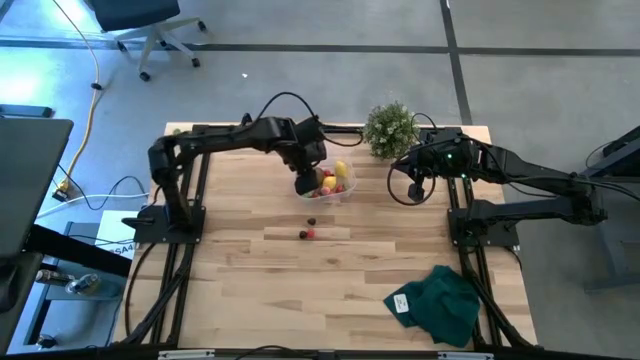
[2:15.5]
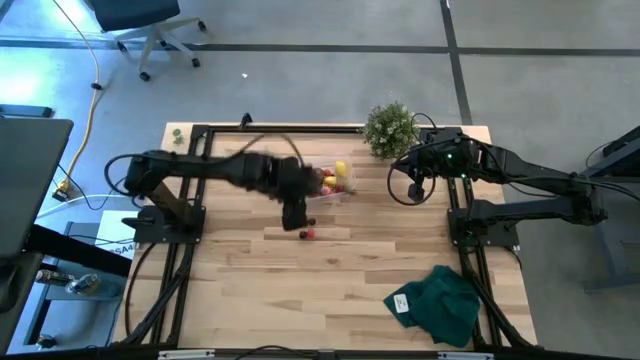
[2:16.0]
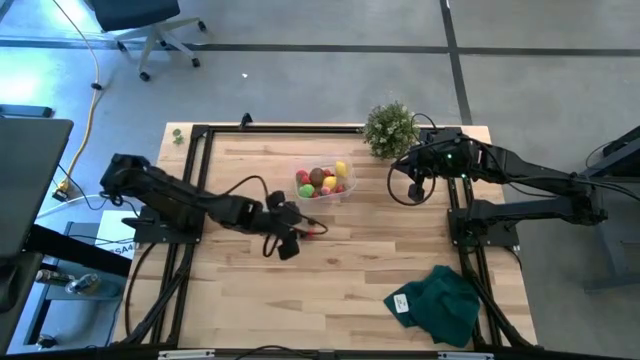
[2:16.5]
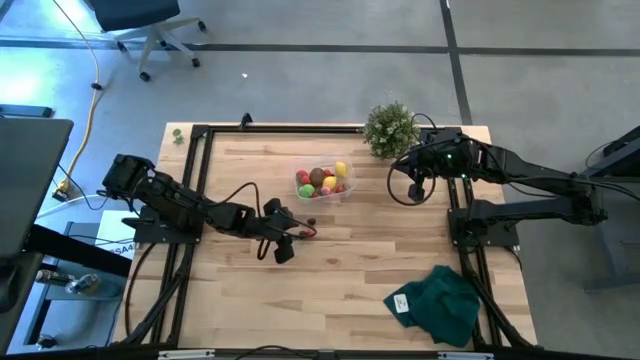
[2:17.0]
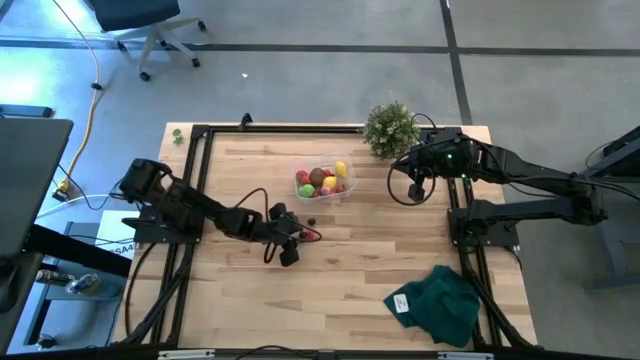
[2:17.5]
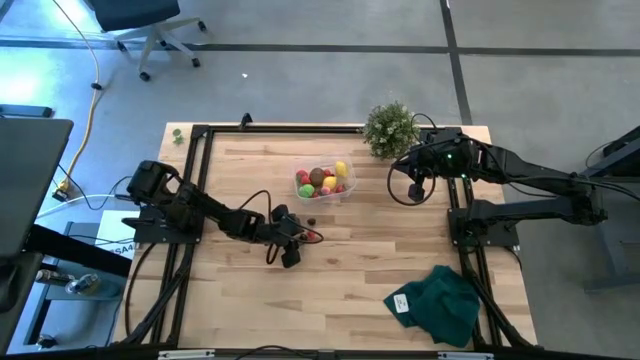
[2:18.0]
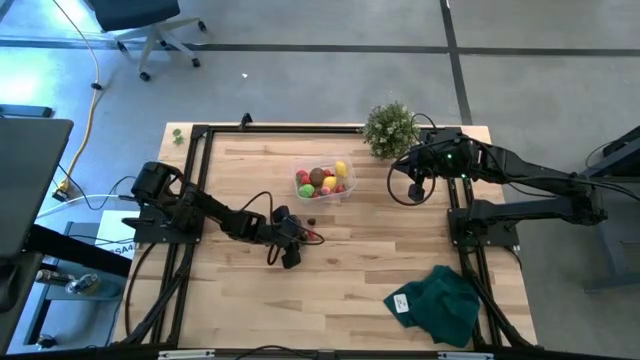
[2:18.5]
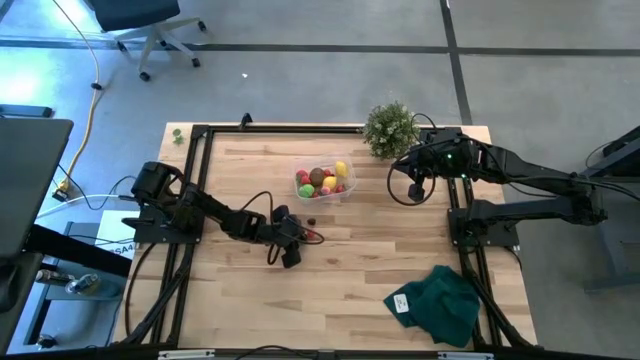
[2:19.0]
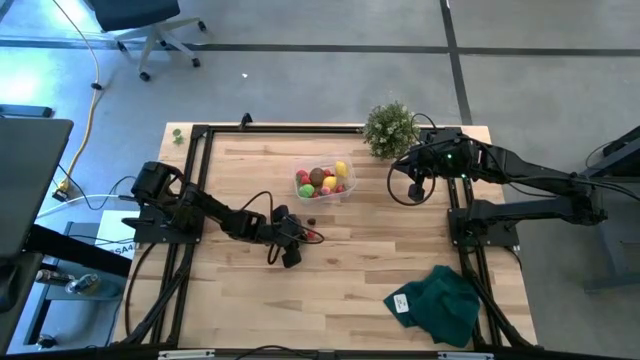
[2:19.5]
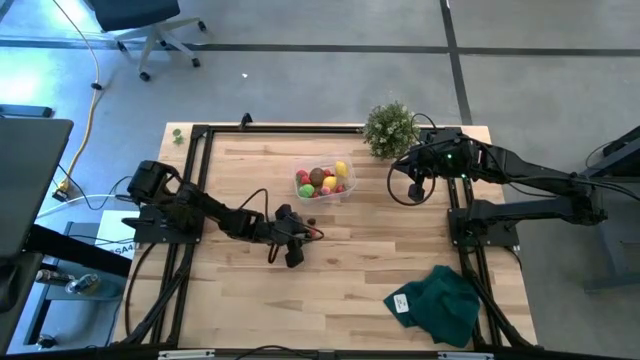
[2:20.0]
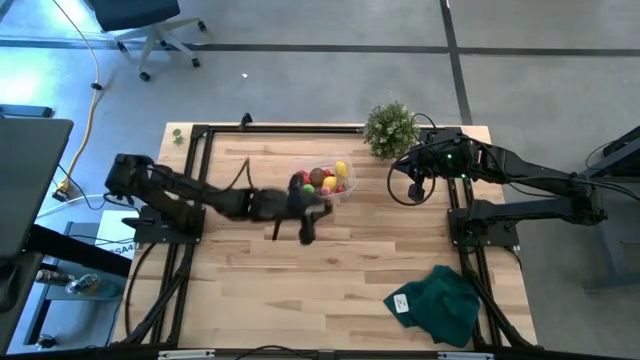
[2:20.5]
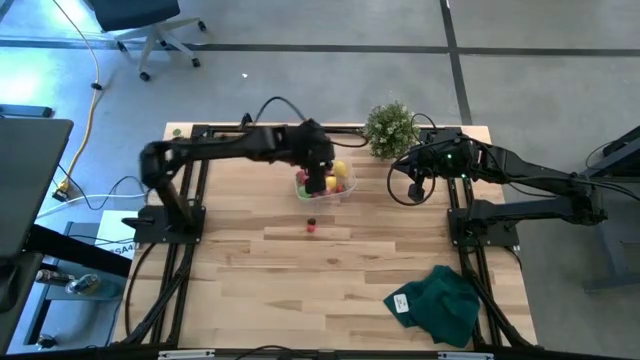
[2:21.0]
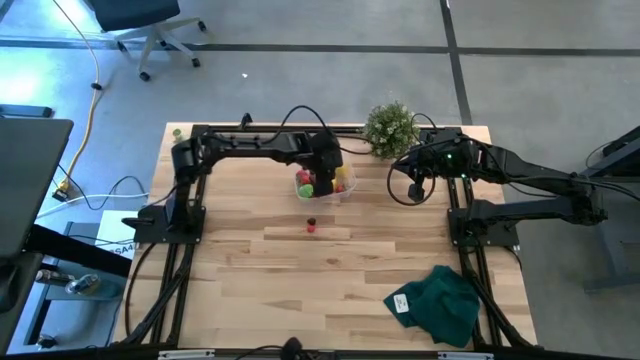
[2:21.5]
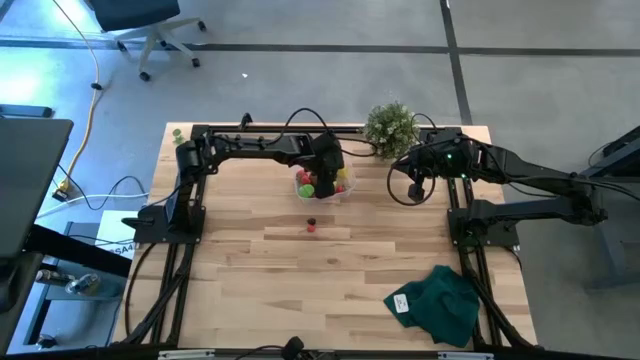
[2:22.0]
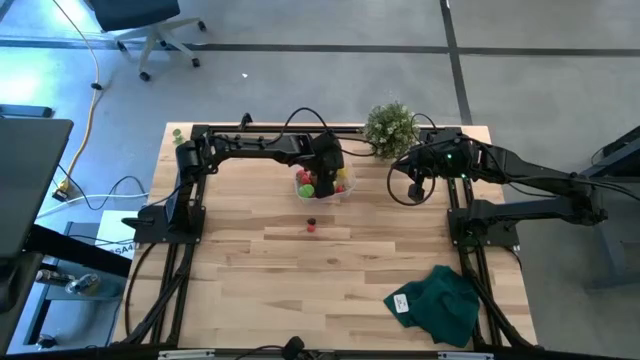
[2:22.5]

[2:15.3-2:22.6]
Task: Pick and placing Produce into tupperware
Put the black cherry into the transparent bin

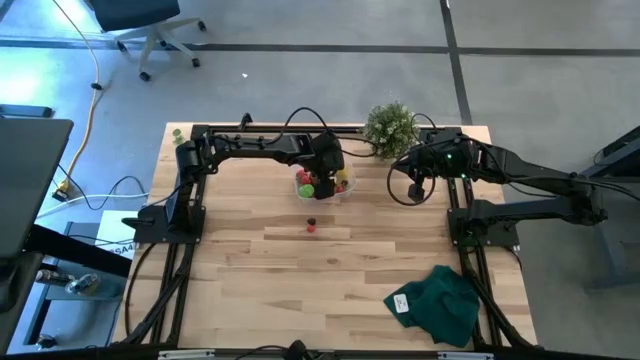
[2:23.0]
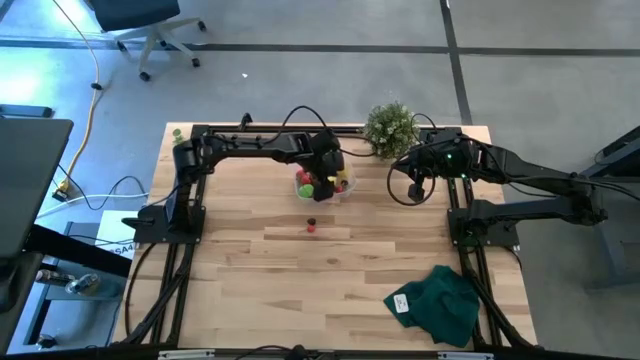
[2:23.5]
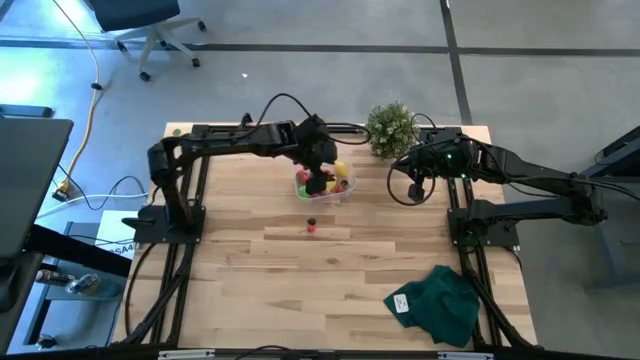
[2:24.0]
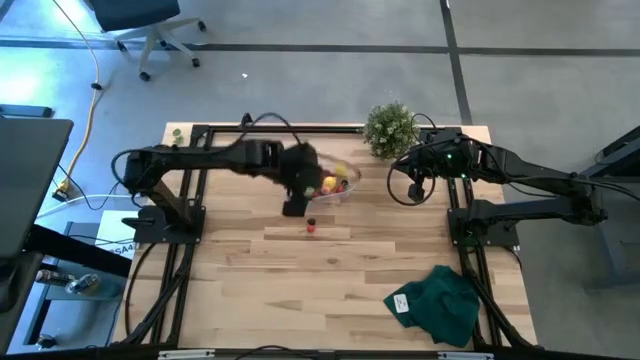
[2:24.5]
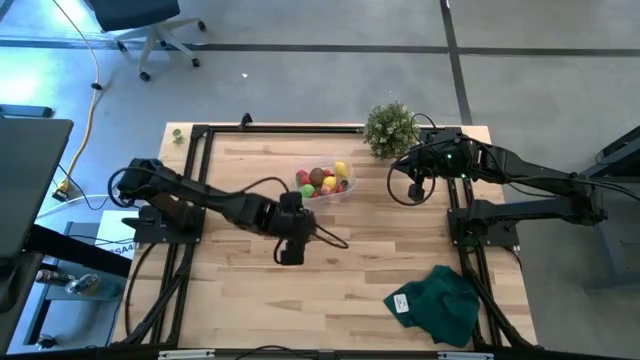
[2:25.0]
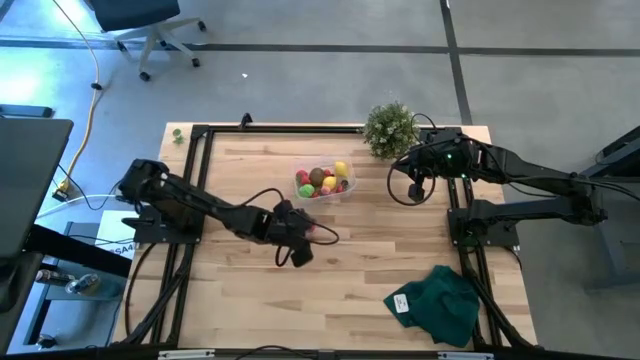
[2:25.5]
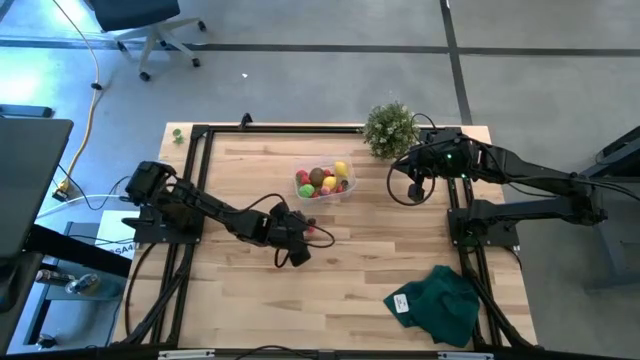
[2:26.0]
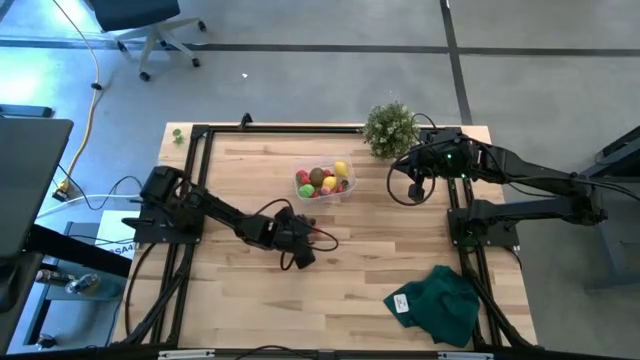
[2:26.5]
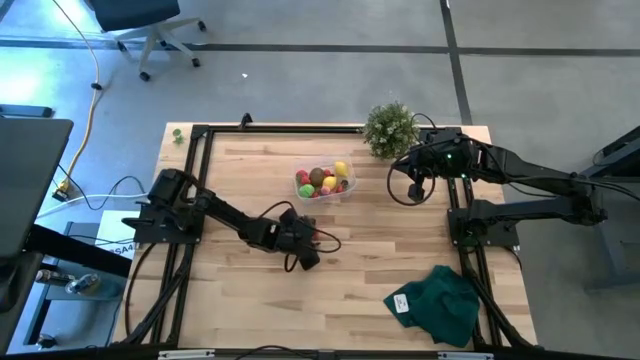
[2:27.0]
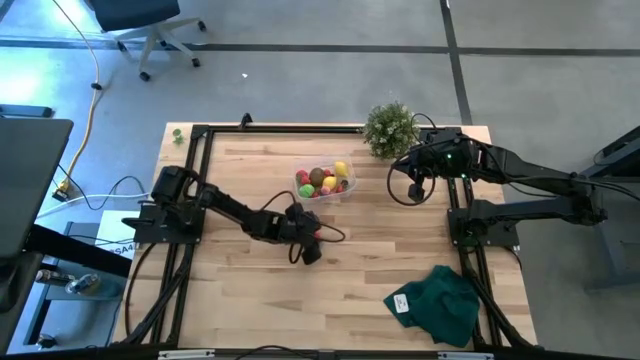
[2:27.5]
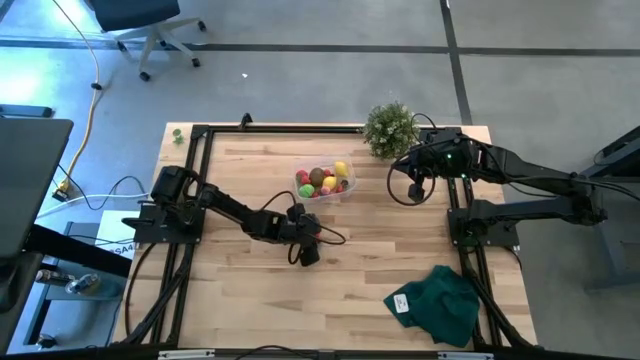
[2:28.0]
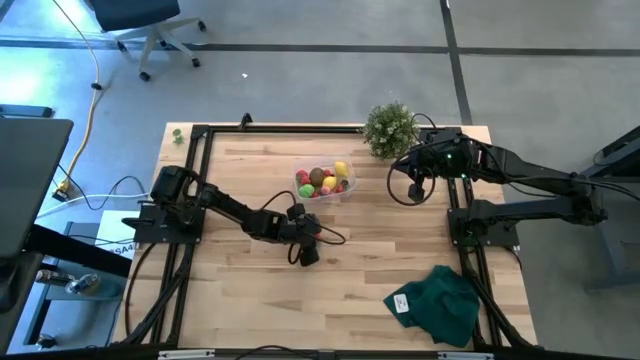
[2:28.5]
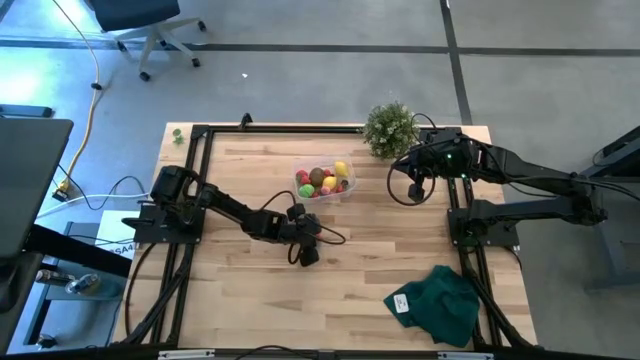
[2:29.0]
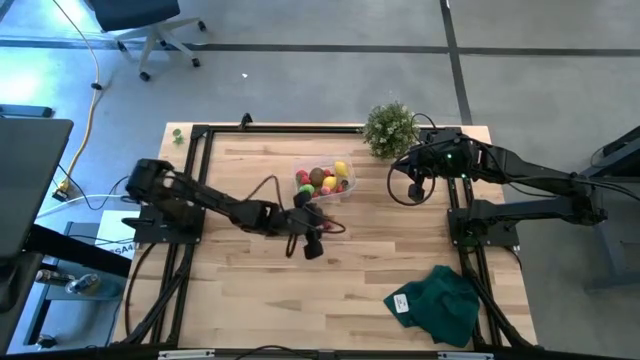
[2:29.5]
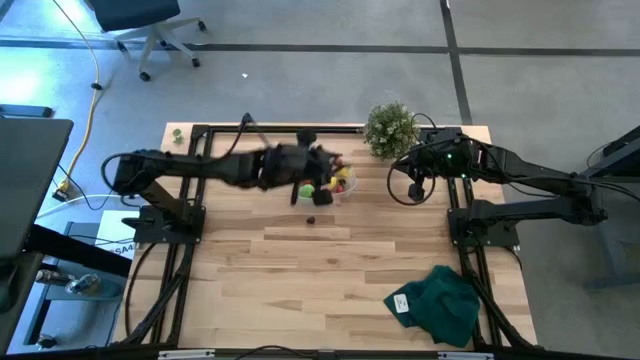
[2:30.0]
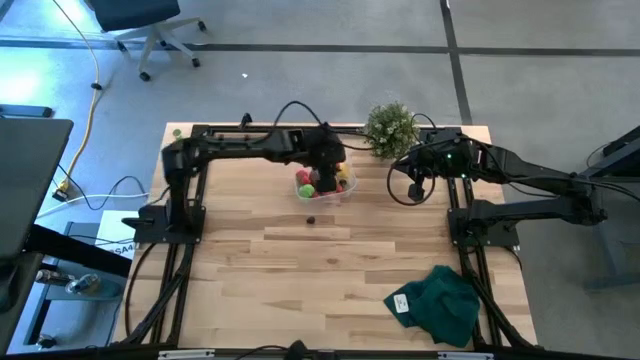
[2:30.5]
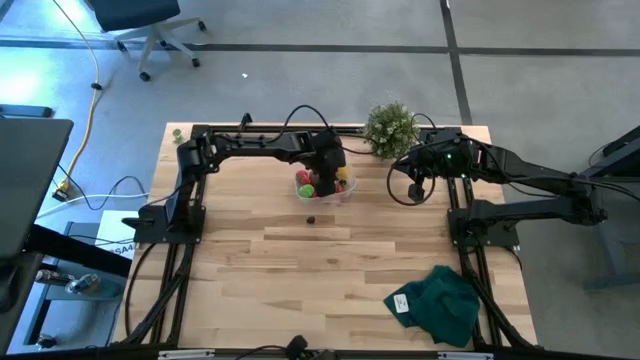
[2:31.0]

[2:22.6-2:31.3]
Put the red cherry into the transparent bin

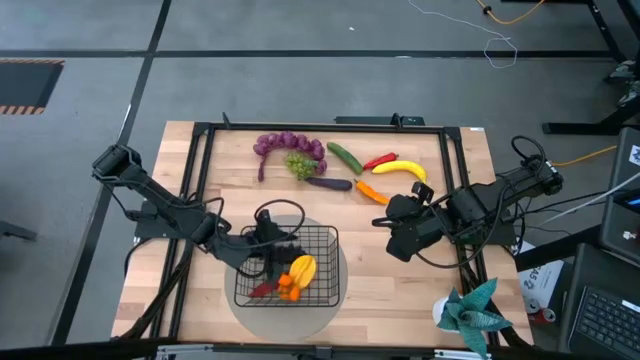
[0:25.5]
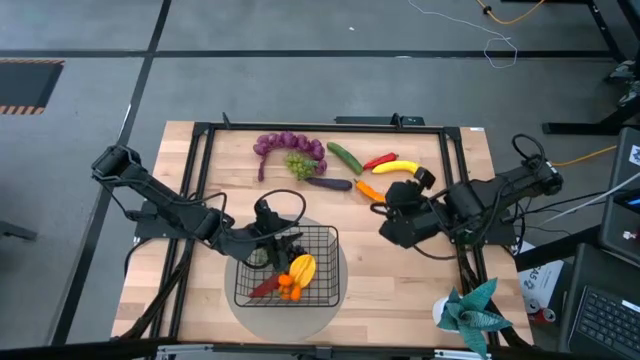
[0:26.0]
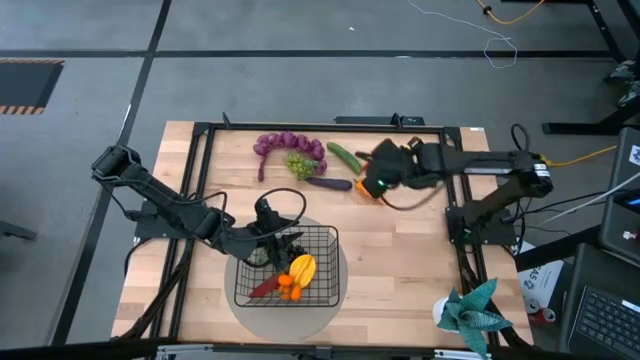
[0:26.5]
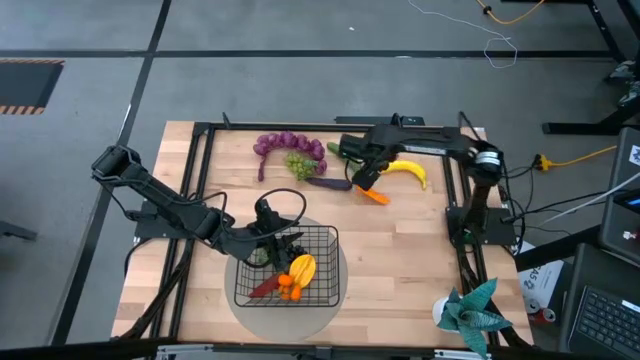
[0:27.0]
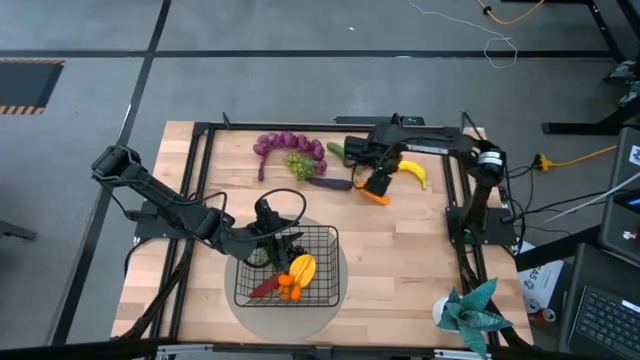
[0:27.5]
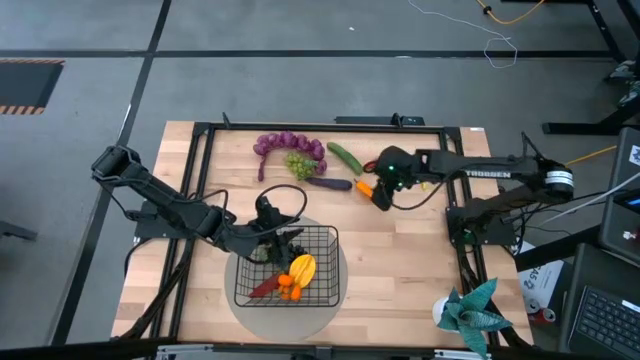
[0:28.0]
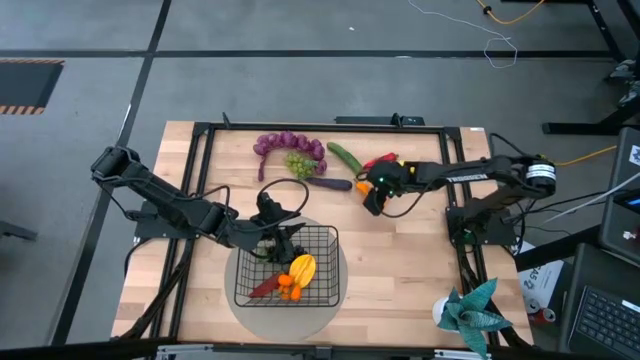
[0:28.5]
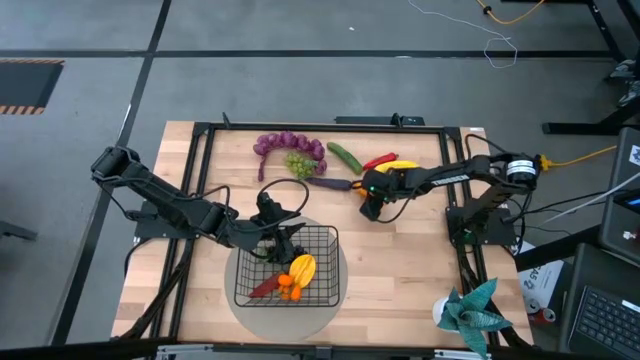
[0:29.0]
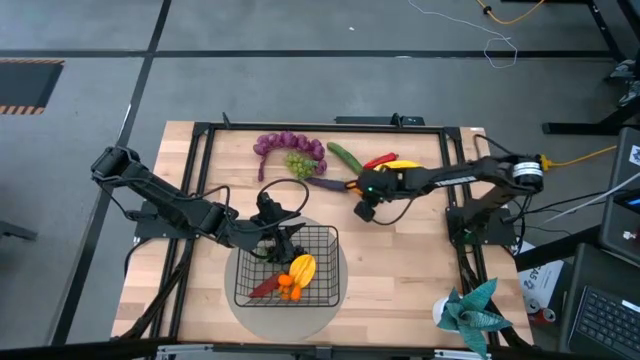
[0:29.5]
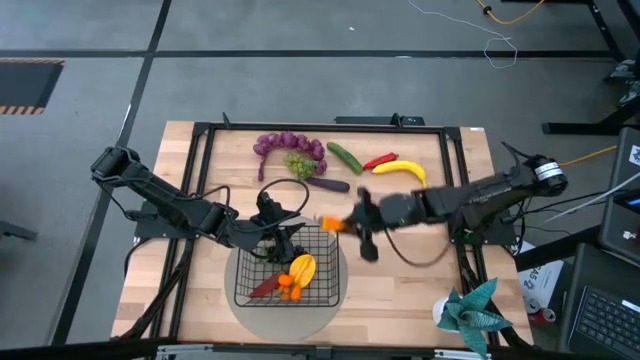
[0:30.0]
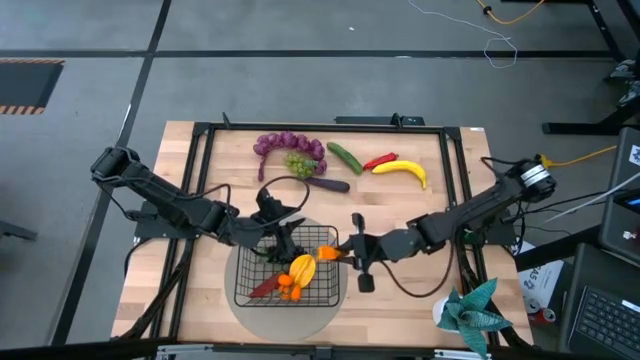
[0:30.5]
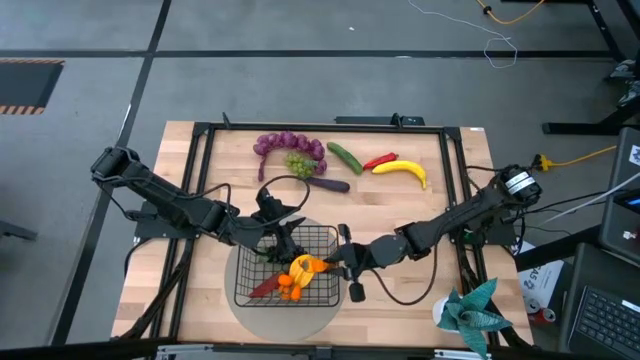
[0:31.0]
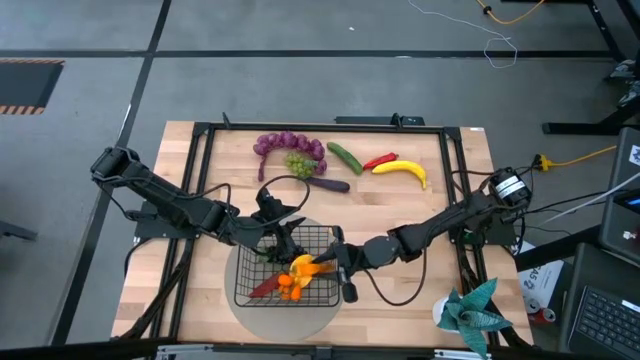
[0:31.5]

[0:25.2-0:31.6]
Task: Build produce basket
Put the orange chili pepper into the black wire basket
